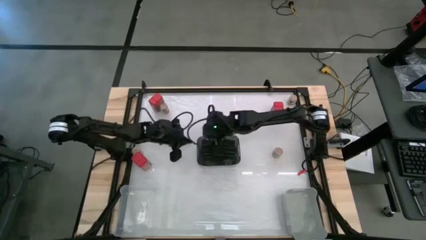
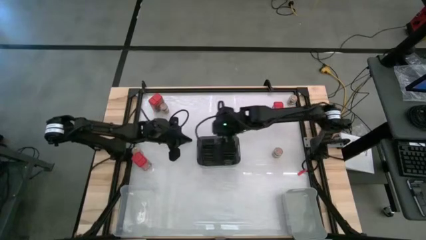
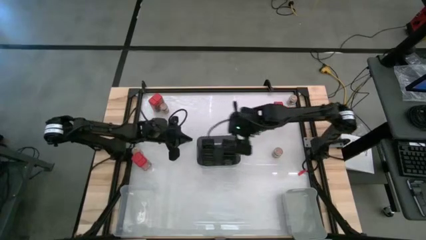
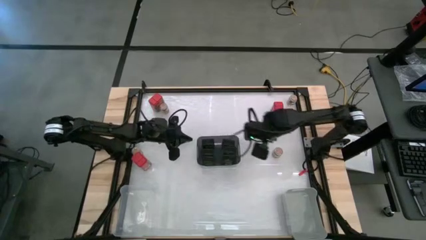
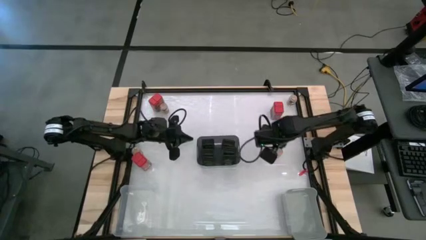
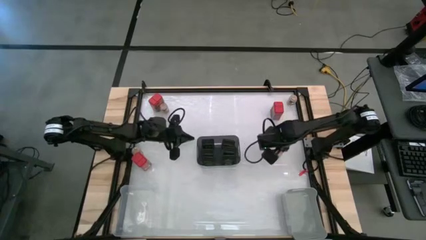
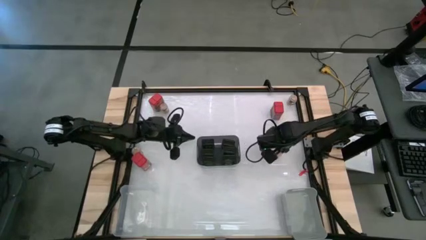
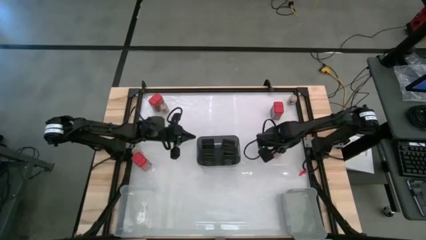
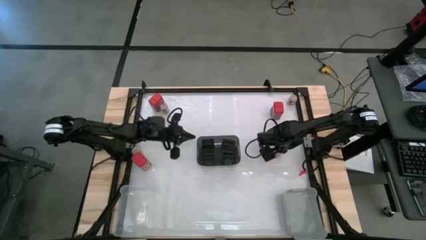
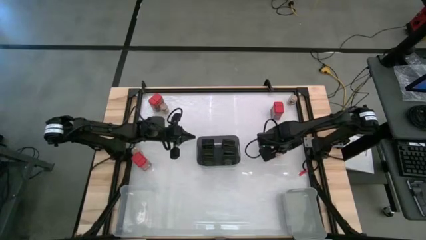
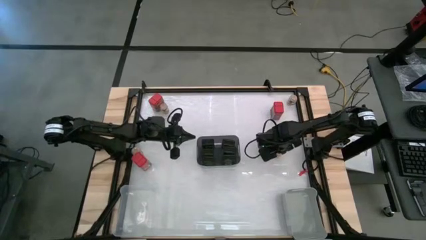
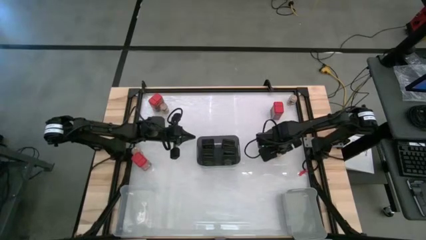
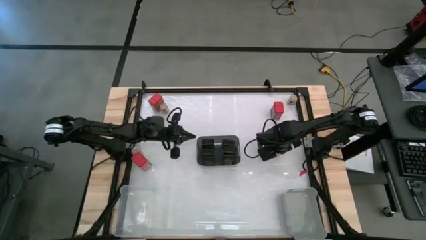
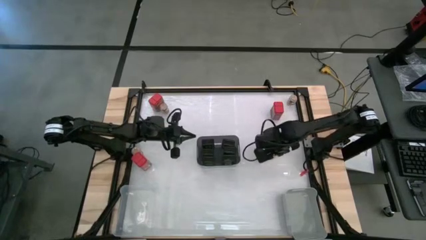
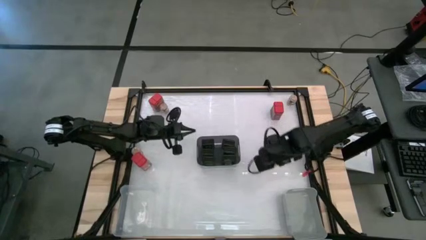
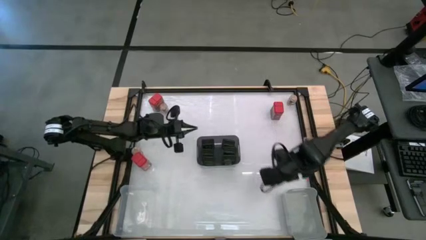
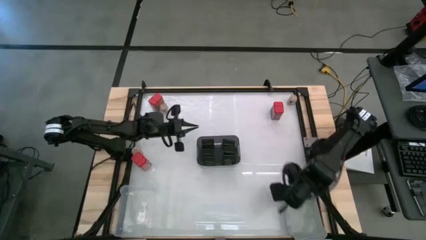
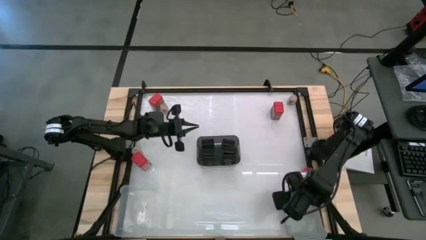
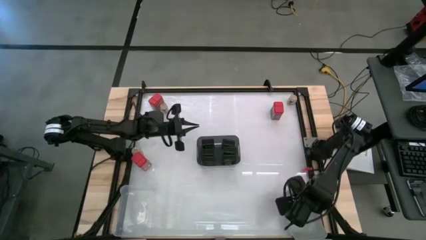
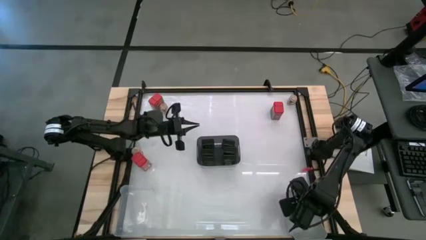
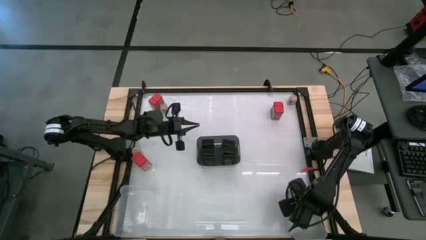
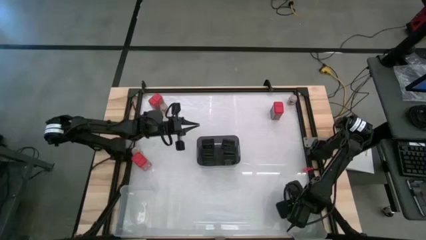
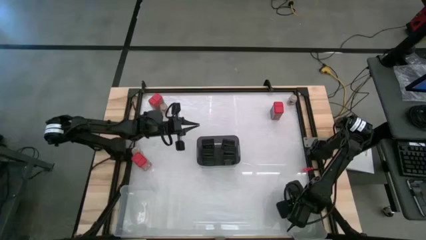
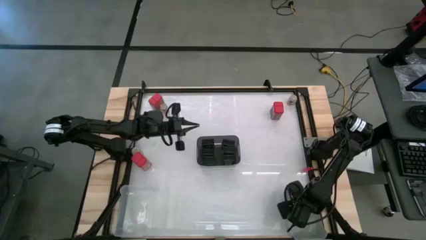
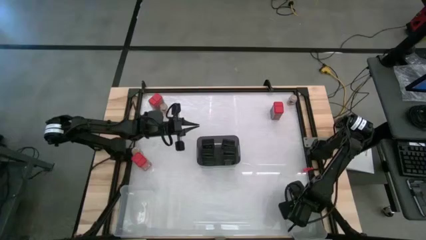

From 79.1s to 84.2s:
Task: Sort spices by type
Put the brown seasoning bottle into the gray bin

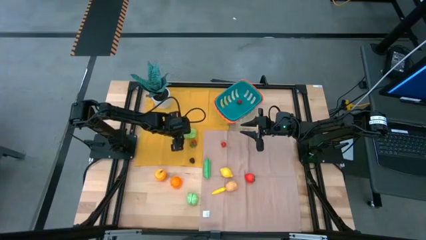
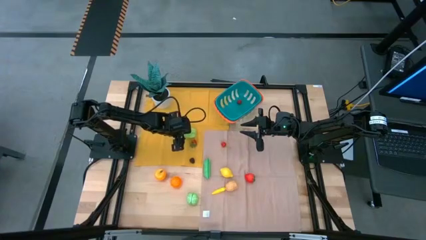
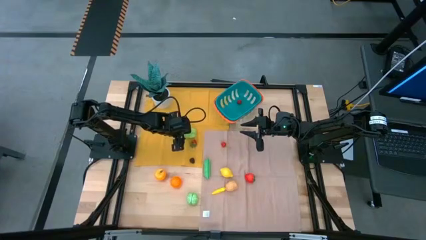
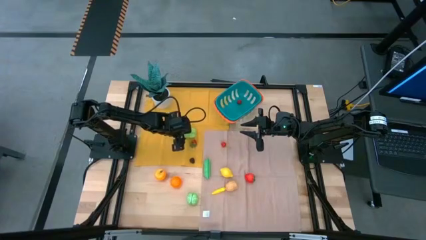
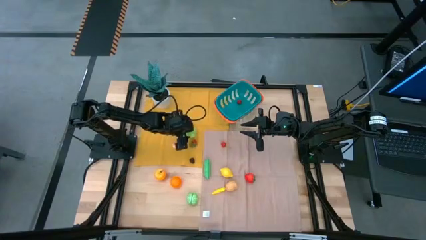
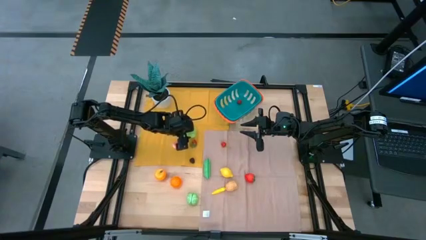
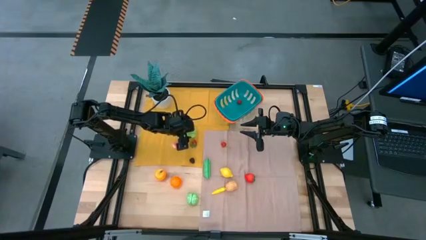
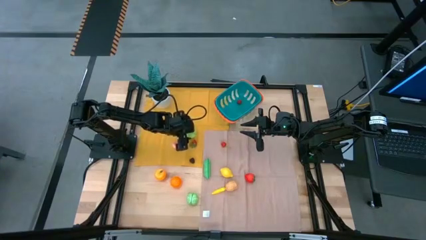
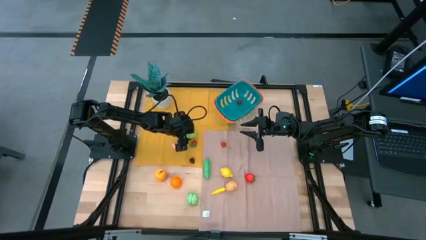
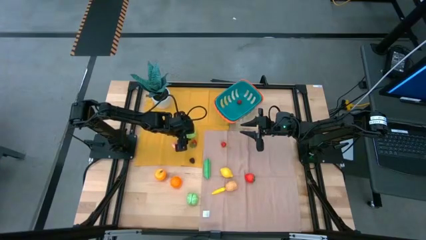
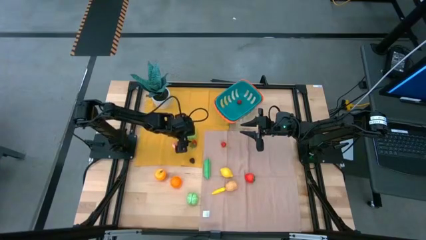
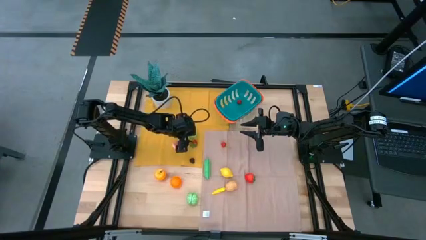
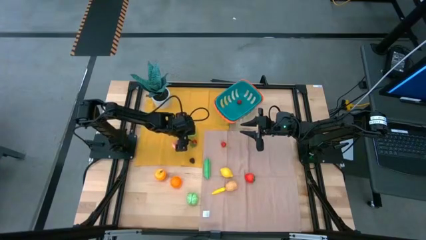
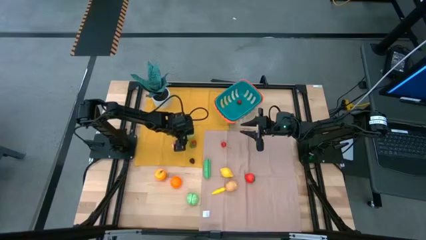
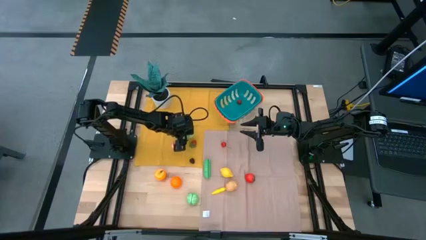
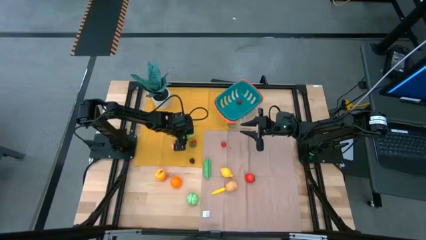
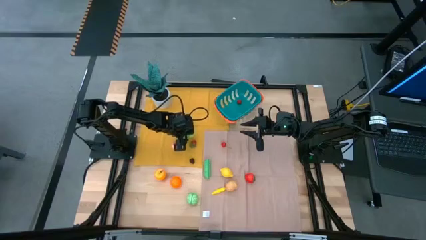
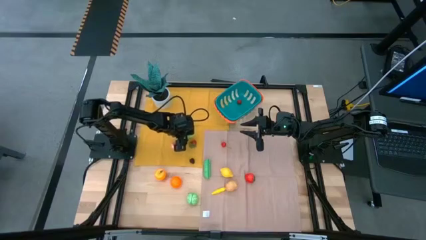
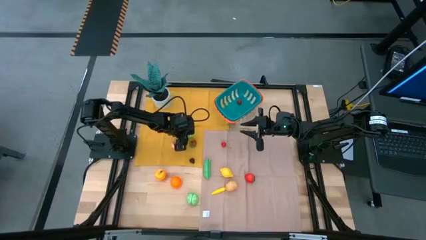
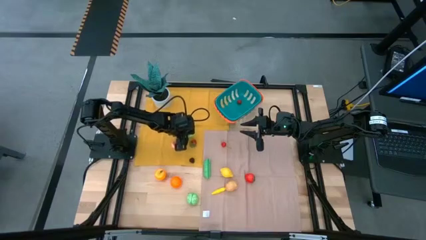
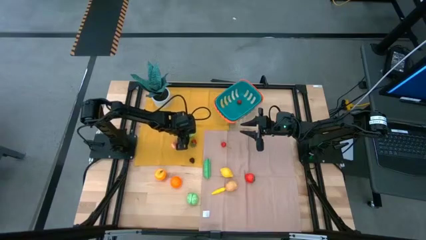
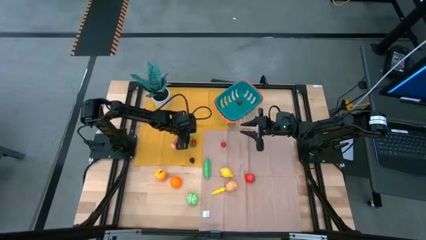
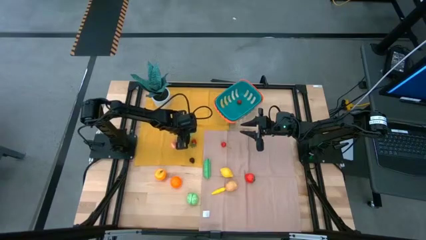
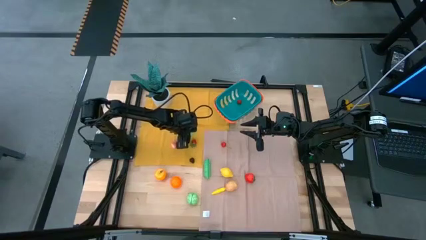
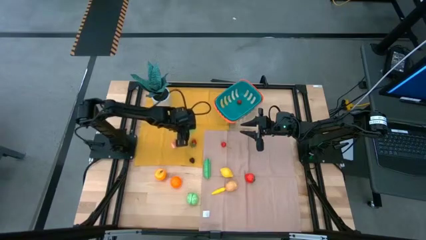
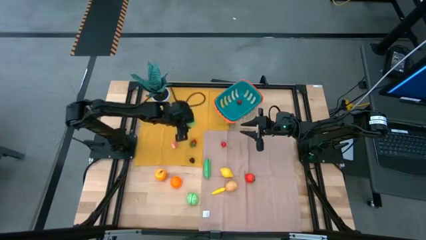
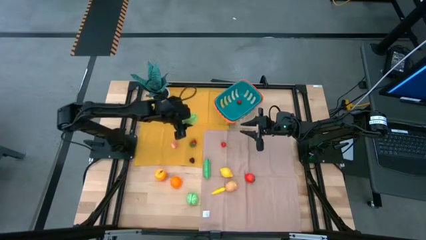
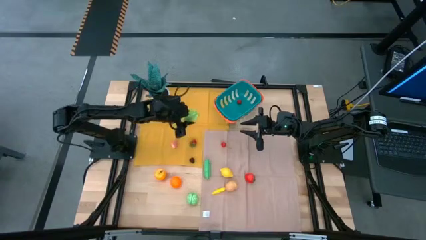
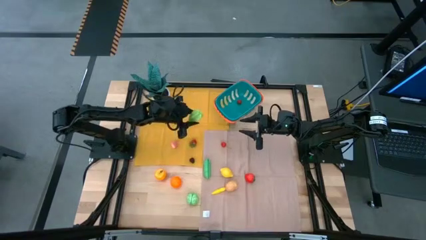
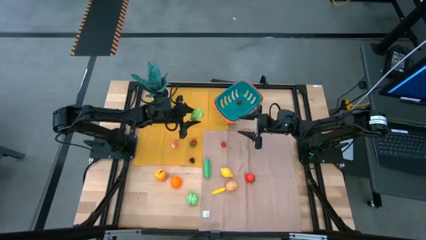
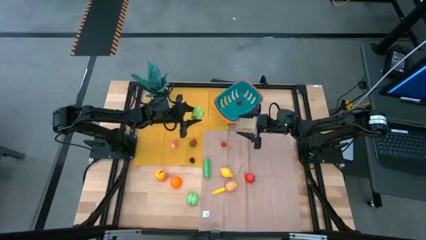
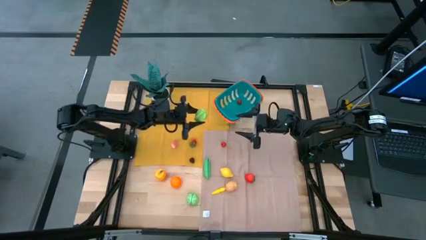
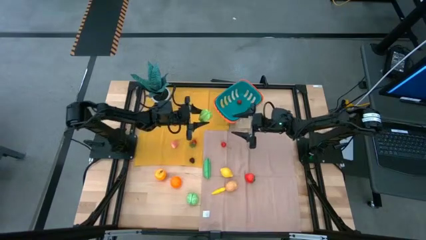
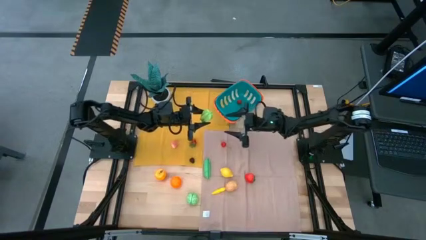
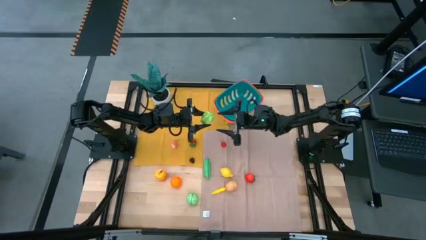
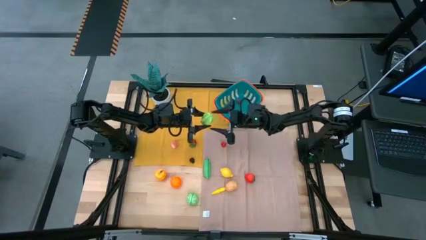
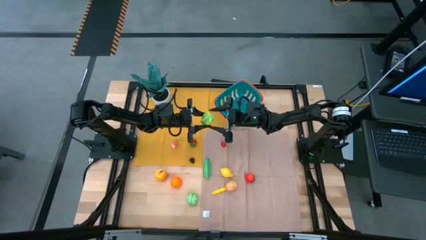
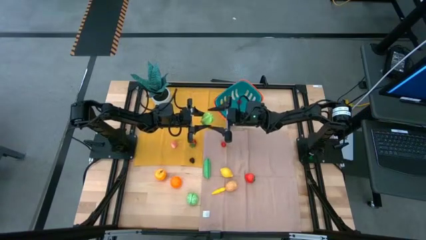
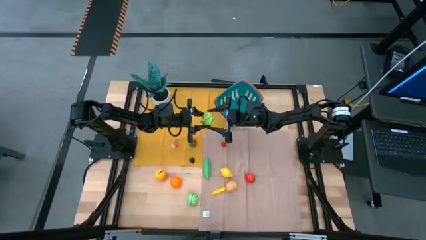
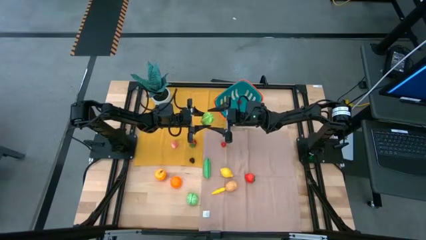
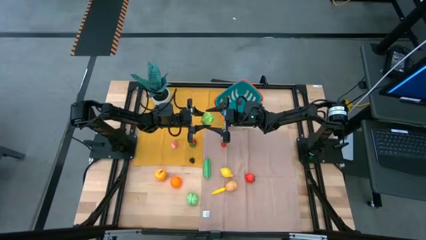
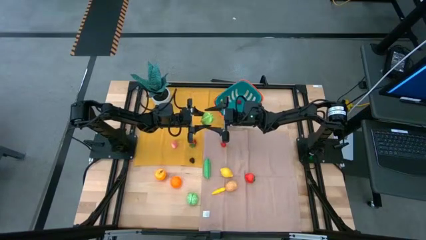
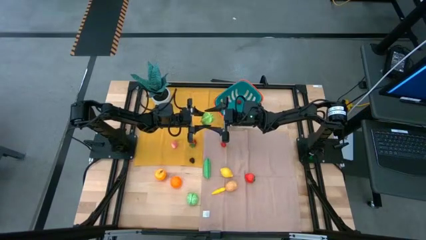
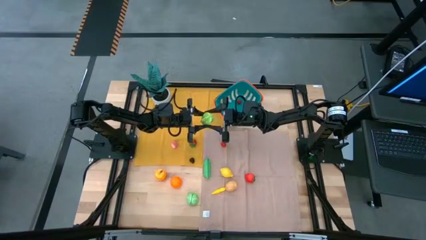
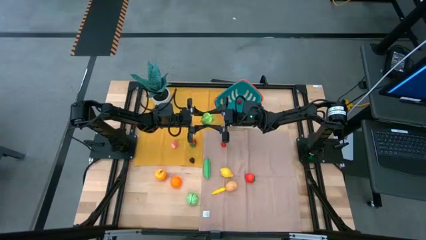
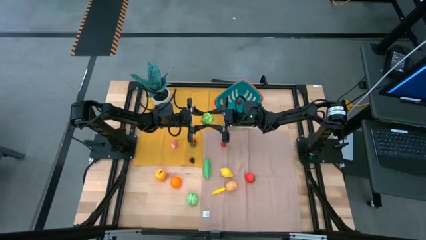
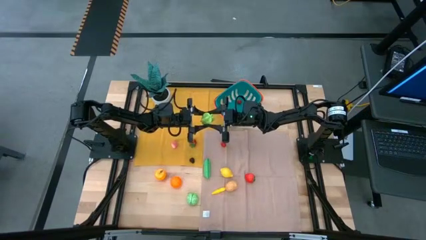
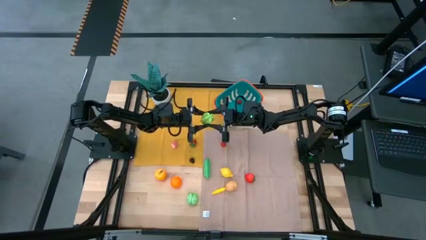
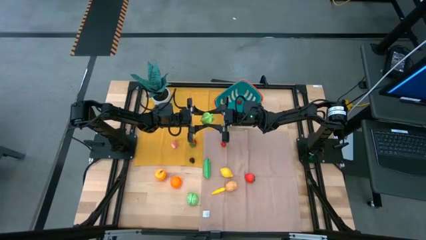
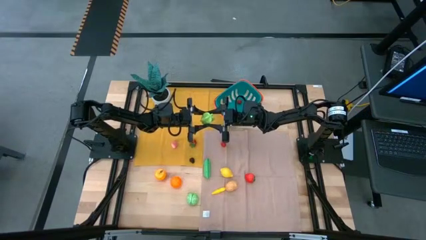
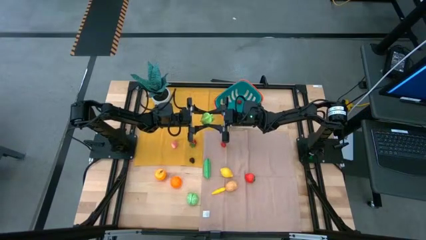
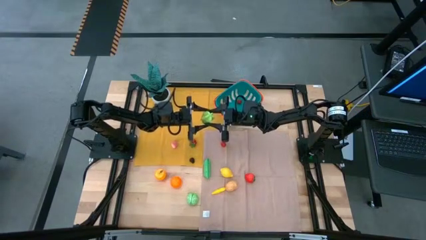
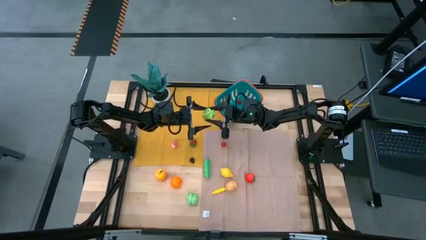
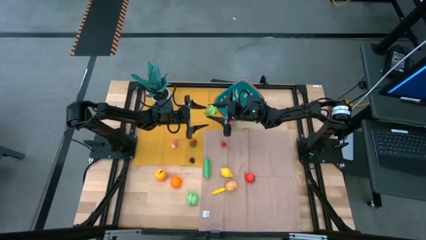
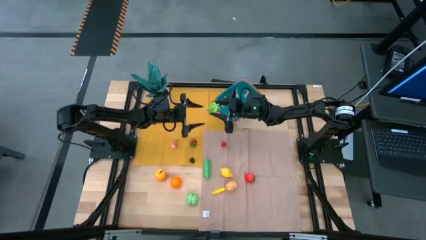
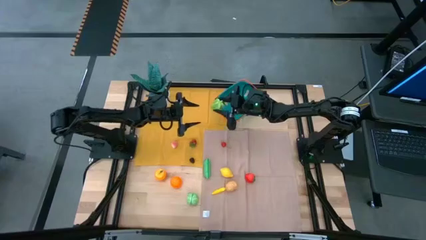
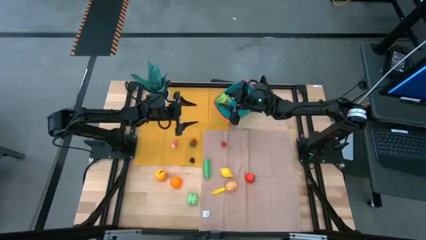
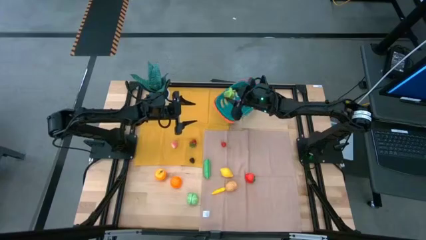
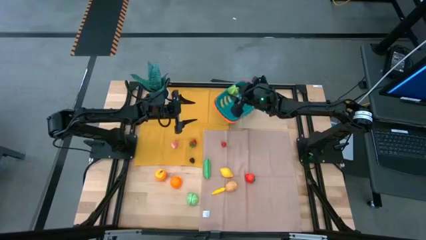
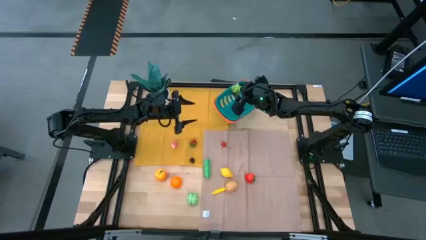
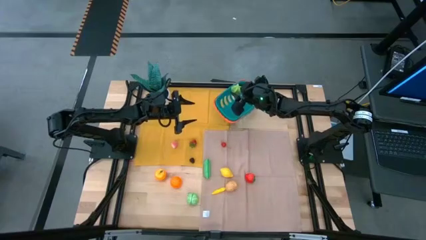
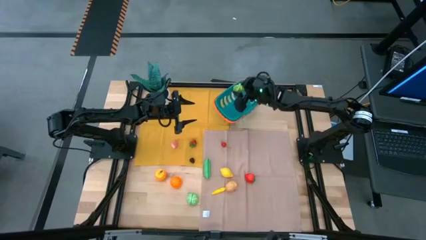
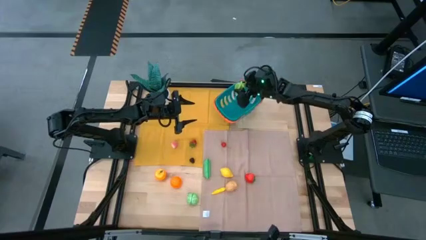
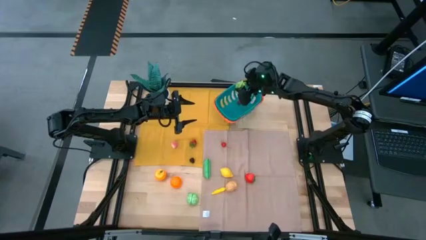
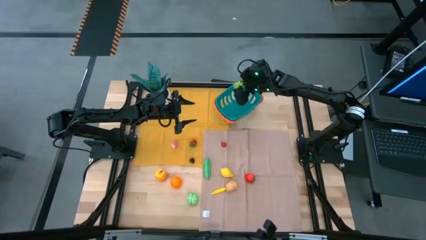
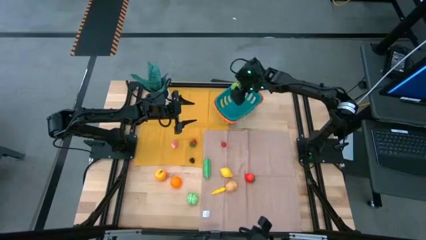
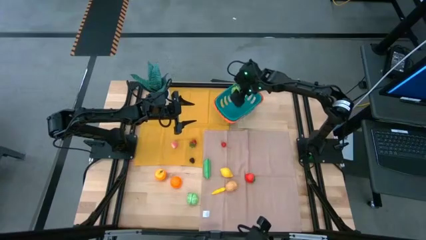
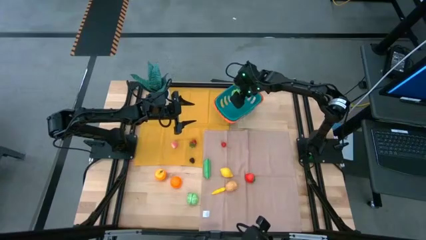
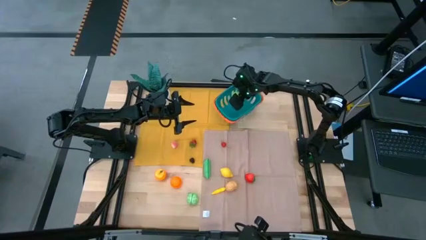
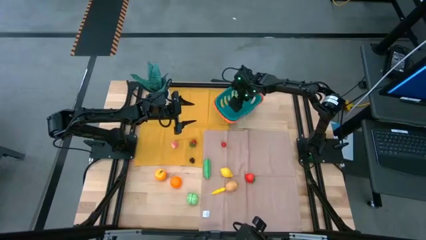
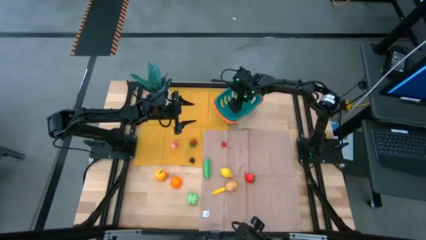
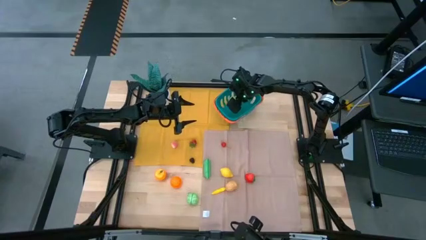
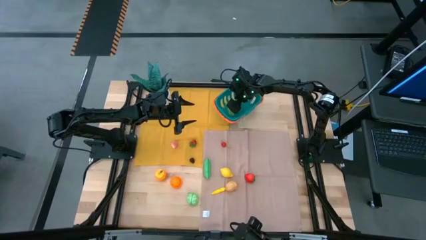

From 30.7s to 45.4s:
Task: Pick and placing Produce into tupperware
Put the starfruit into the basket
